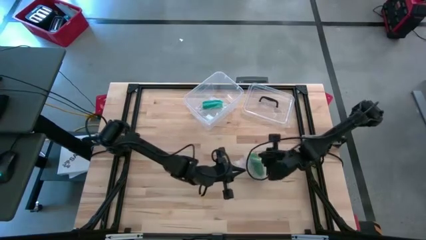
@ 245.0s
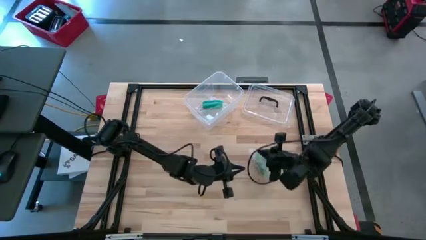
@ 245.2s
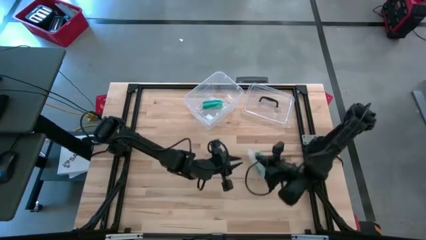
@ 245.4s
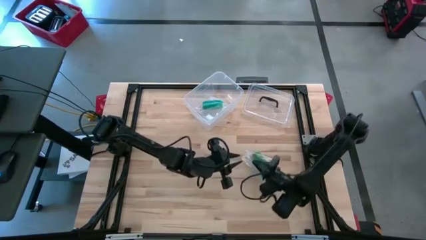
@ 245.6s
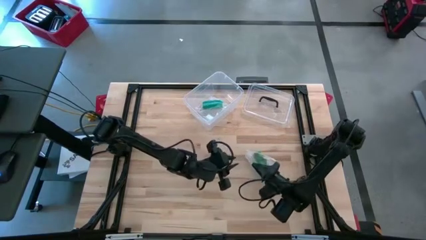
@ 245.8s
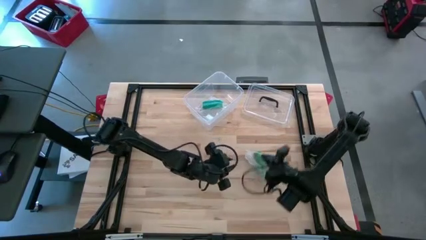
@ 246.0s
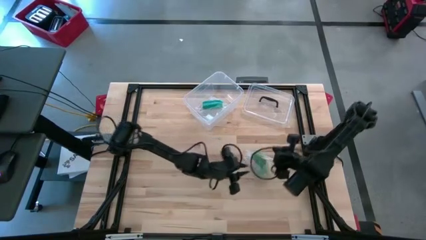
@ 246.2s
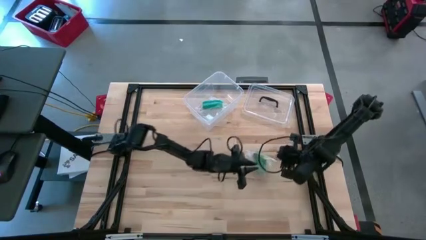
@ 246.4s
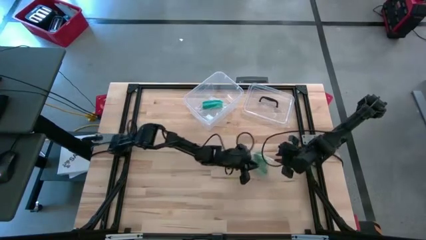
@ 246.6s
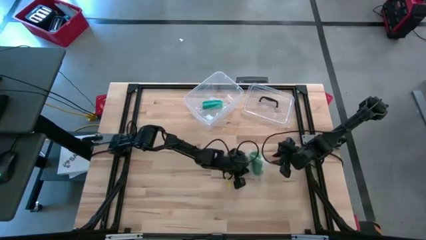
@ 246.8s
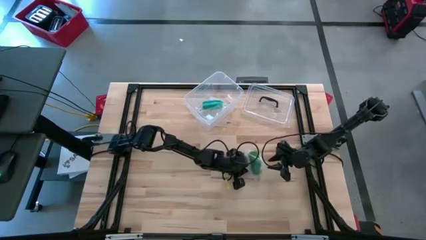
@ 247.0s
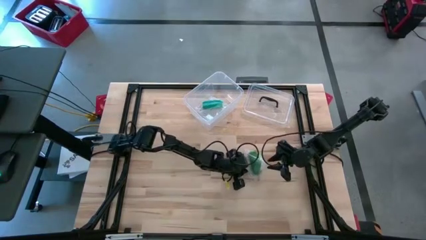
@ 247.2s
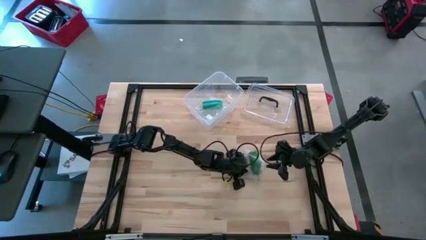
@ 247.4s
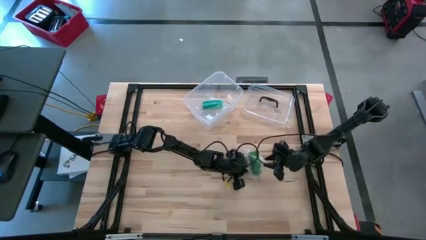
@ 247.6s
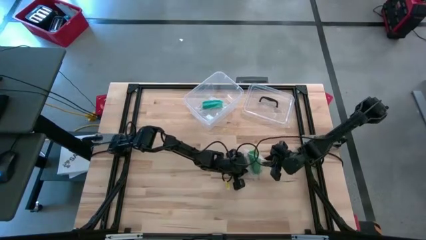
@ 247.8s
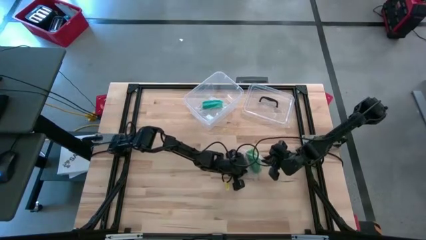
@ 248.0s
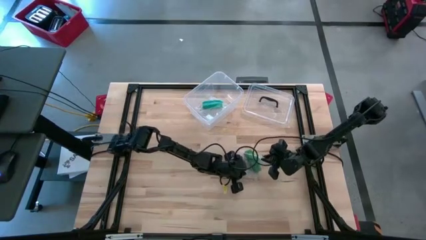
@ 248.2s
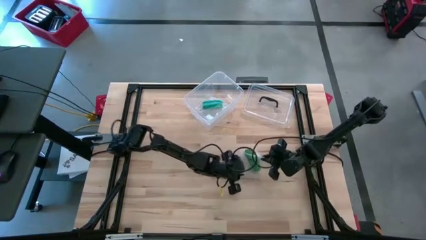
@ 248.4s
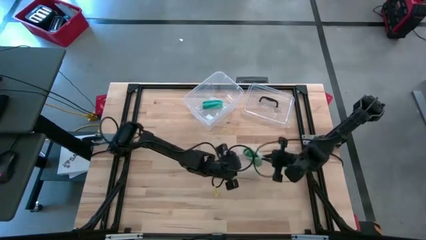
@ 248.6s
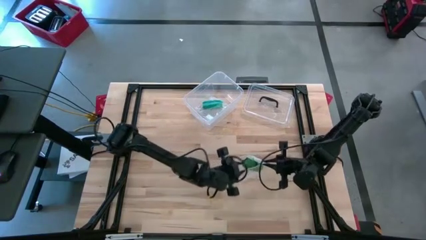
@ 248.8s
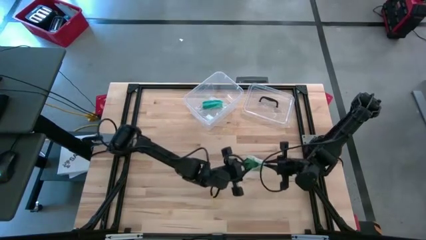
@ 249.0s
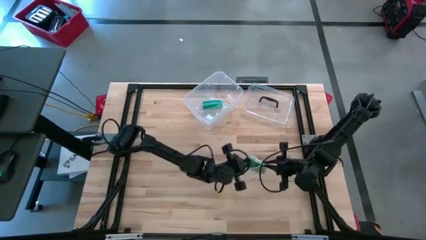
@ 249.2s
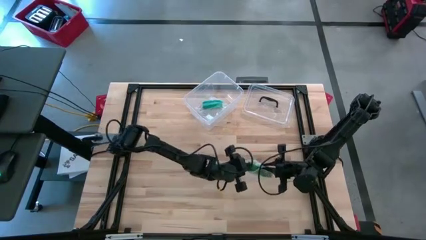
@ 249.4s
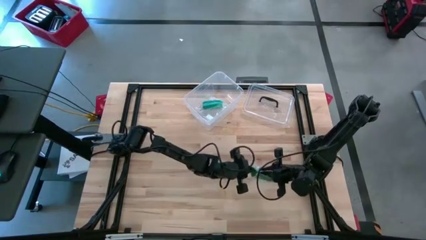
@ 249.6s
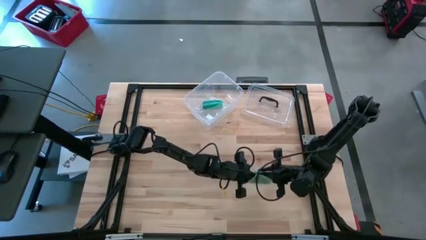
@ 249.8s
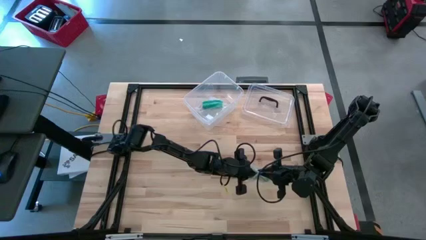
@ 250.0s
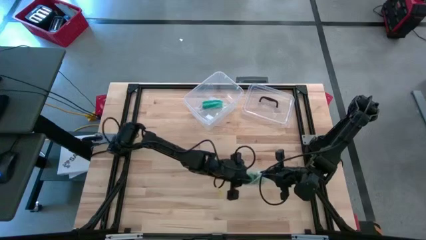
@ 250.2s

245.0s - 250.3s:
Task: Roll bandage
Put the green bandage into the transparent zip bag

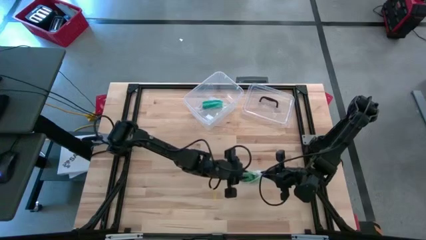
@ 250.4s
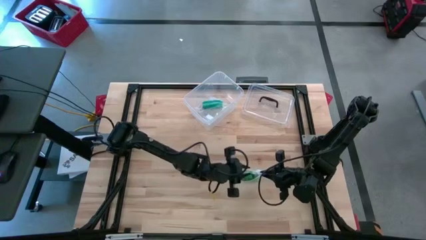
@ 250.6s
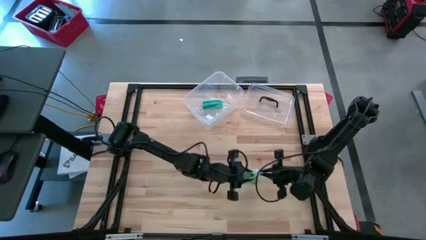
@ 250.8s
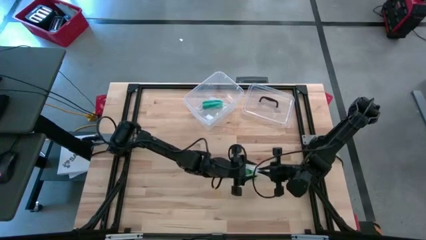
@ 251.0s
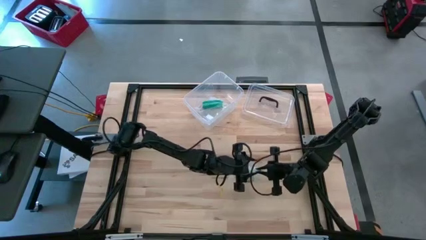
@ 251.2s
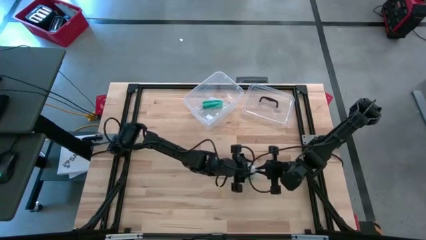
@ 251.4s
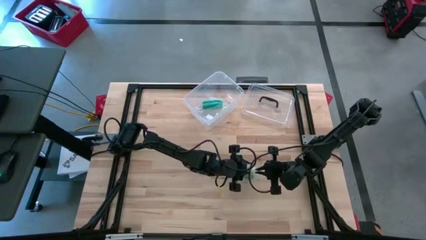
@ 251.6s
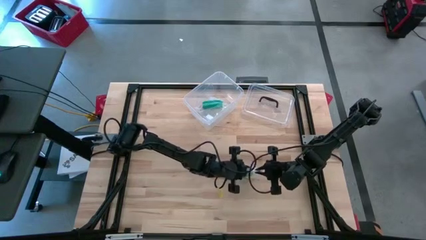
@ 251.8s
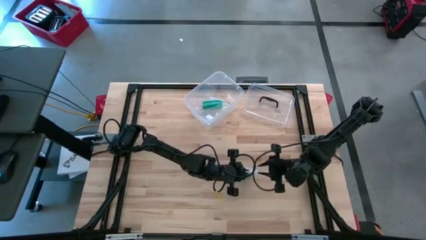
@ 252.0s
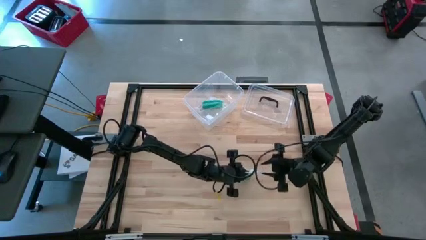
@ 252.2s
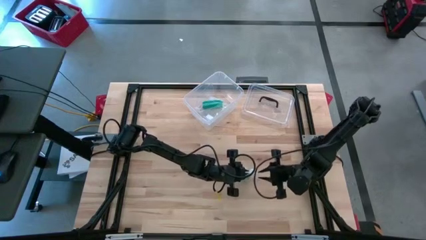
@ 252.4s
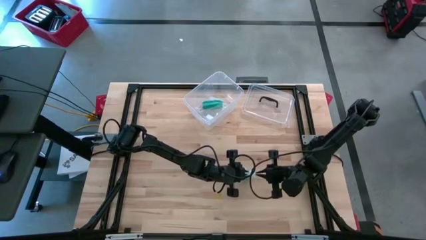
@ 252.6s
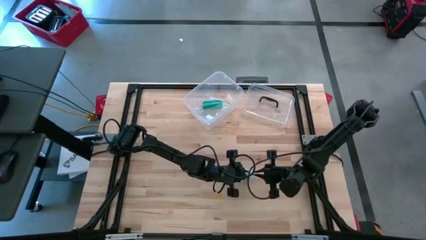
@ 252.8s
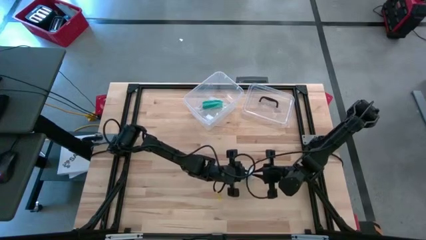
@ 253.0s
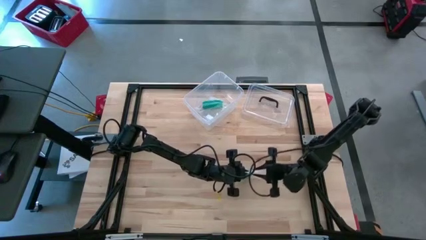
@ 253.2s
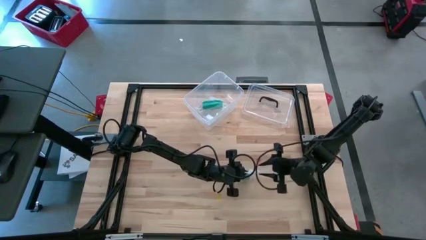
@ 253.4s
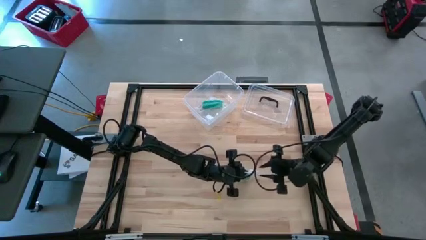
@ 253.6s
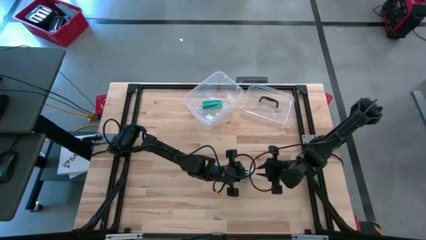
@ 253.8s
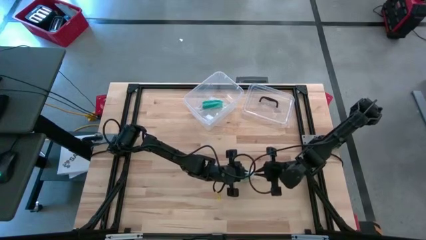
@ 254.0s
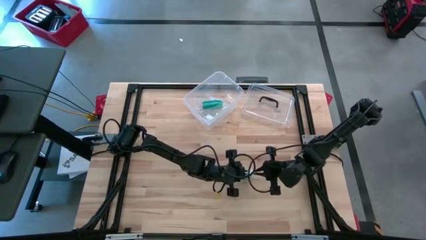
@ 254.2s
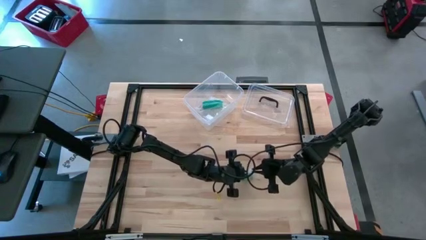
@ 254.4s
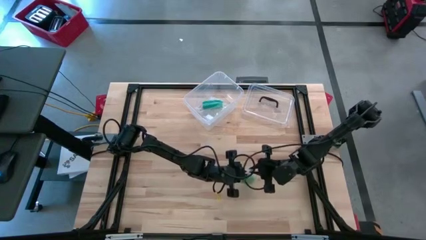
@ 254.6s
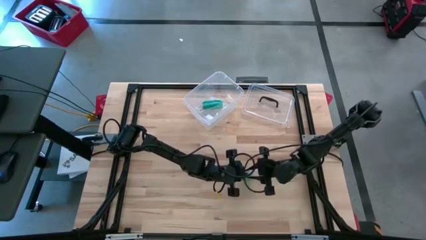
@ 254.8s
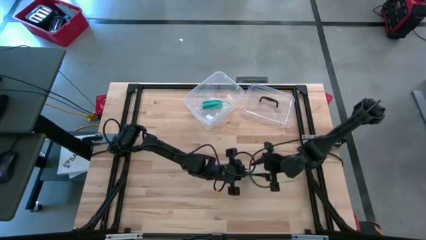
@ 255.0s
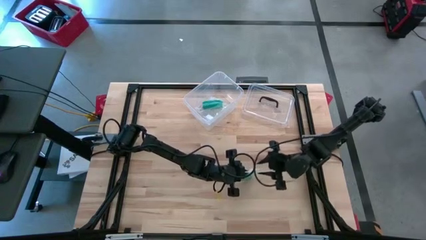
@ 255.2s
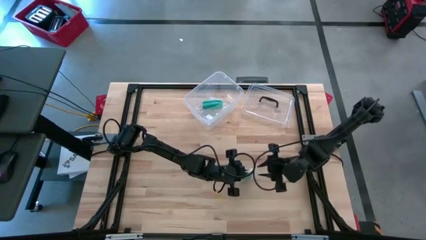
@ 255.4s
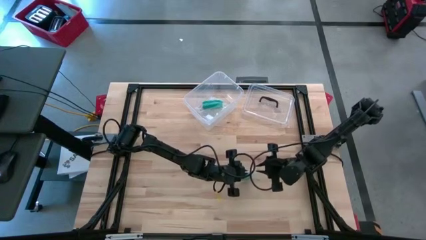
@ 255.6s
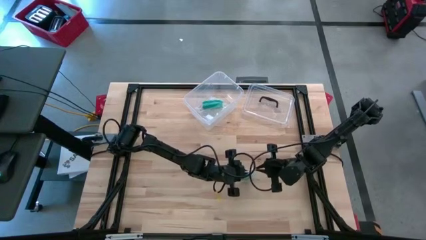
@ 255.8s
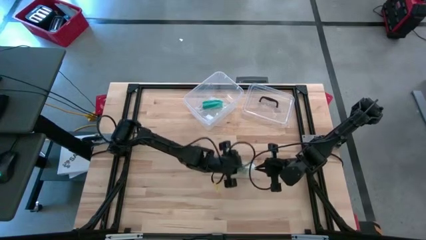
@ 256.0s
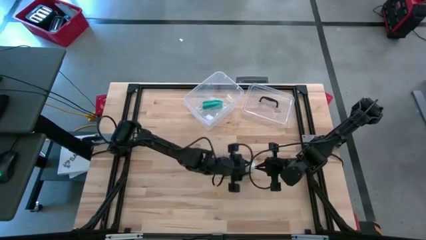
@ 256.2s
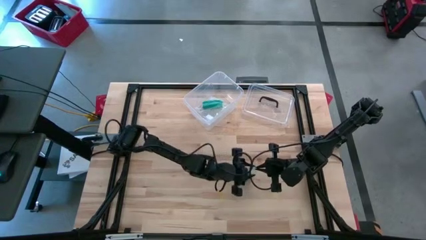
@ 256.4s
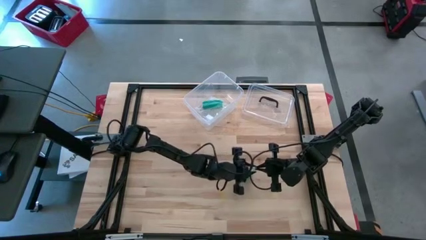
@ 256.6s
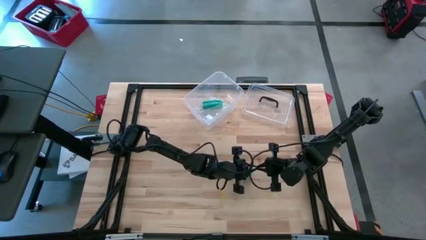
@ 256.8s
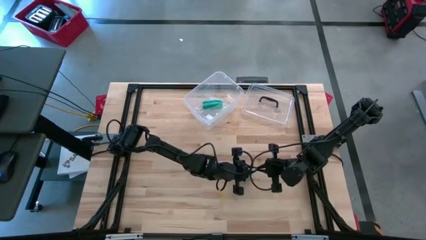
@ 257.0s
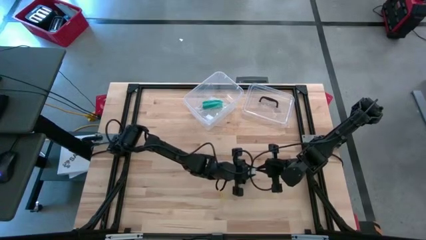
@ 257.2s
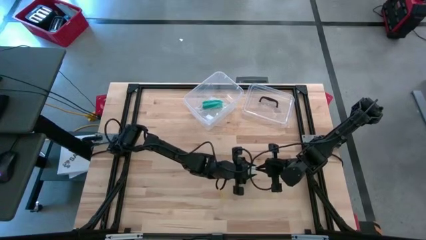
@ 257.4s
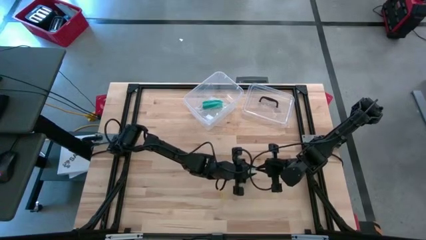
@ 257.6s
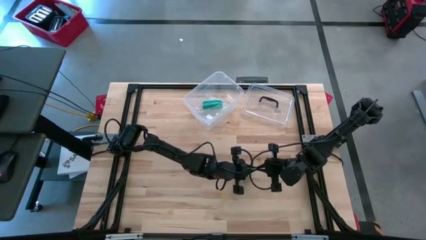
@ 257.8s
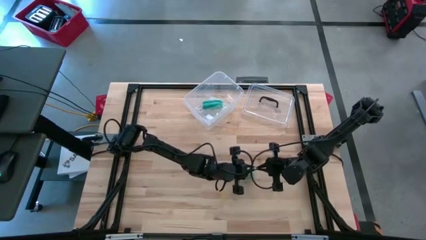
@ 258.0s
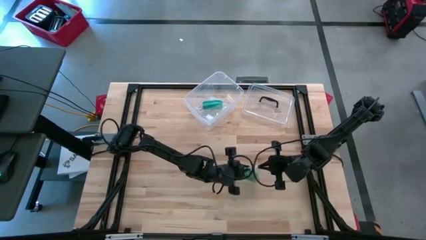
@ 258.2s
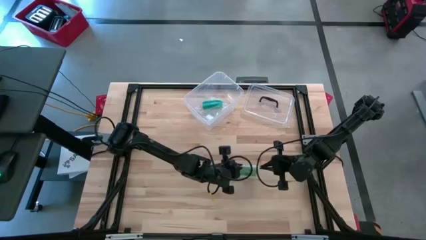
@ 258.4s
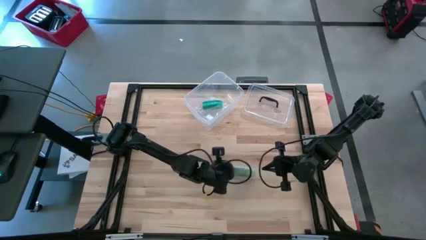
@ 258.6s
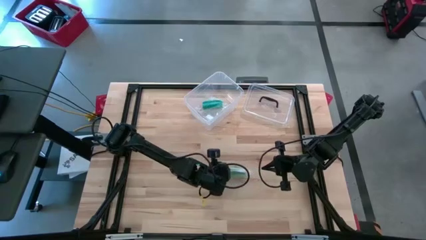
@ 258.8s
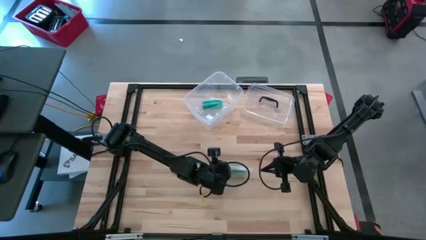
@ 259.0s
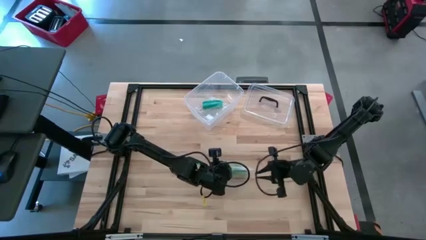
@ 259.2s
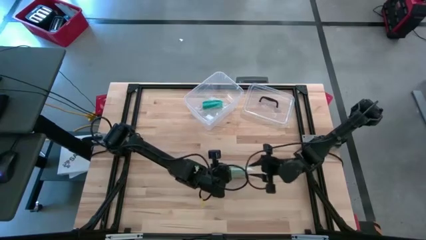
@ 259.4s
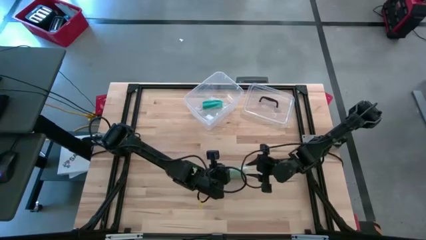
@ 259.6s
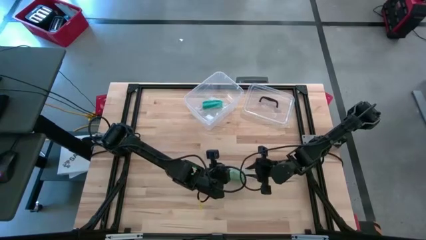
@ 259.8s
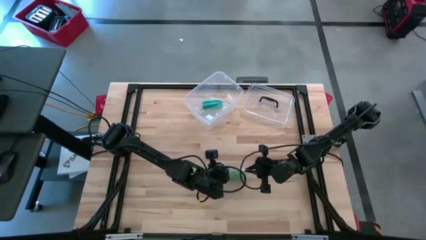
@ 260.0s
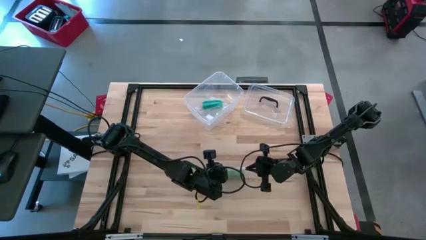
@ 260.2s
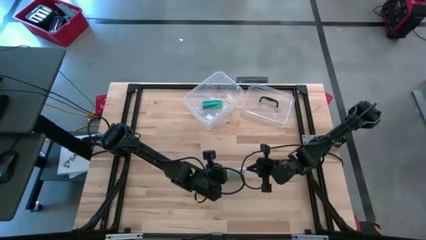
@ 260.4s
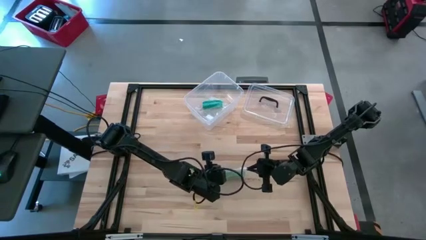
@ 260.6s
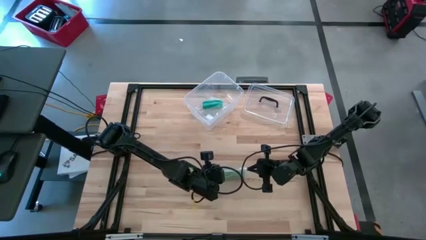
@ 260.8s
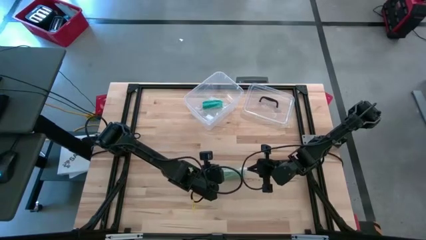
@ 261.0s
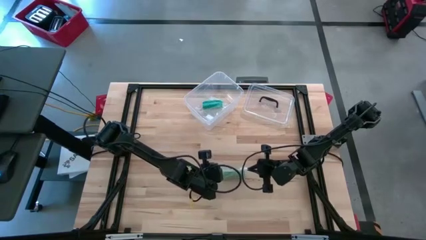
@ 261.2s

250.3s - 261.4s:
Close the transparent zip bag containing the green bandage

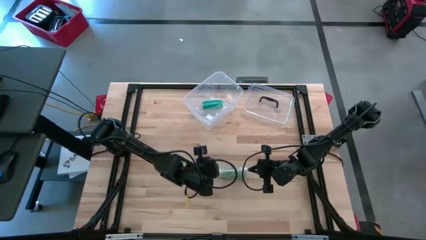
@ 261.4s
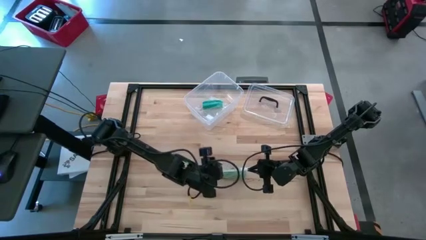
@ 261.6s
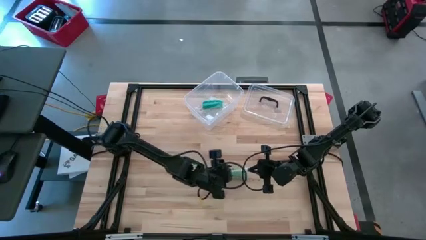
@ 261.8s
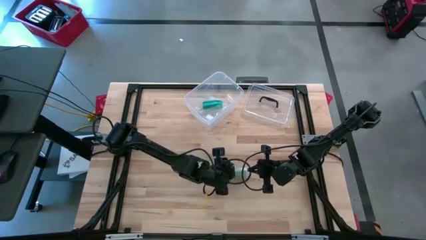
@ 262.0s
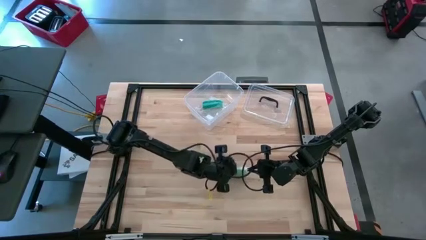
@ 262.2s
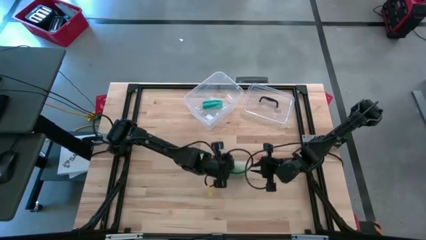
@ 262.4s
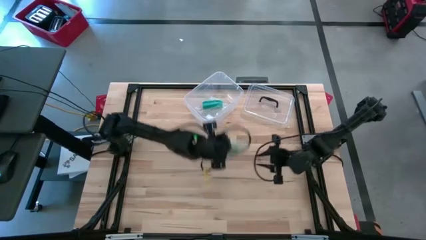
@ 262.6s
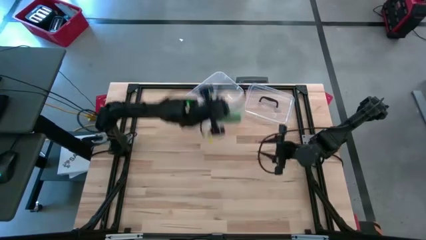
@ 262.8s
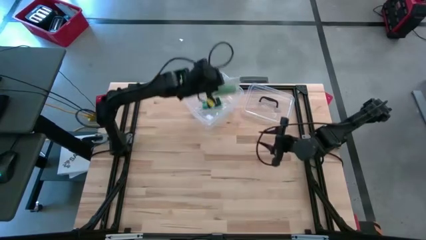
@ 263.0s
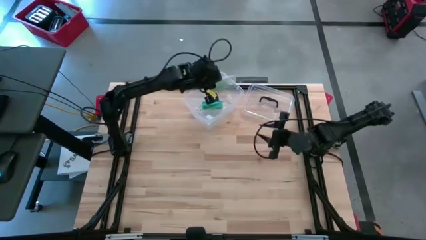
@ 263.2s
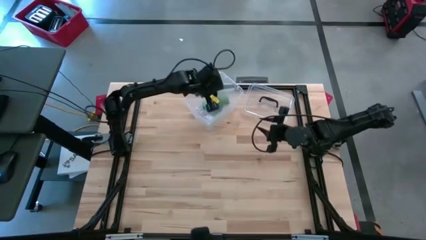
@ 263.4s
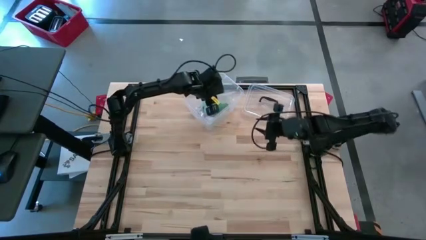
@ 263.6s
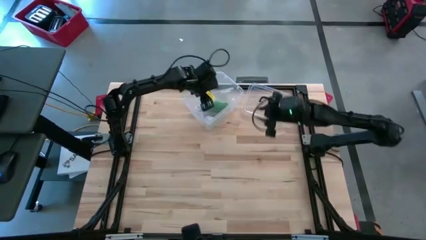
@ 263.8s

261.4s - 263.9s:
Put the transparent zip bag with the green bandage into the transparent storage box
